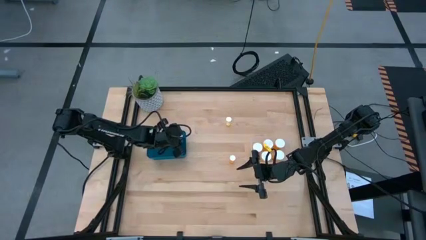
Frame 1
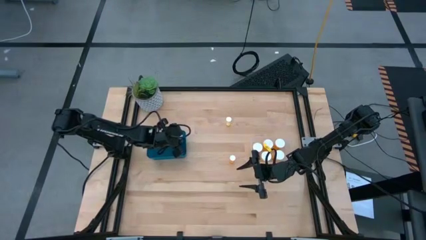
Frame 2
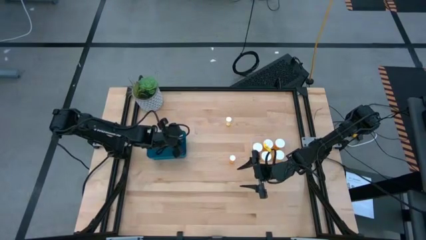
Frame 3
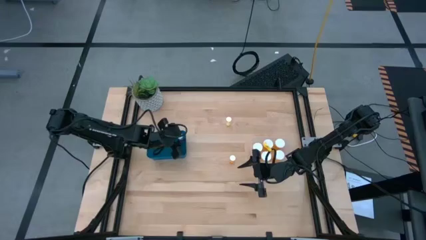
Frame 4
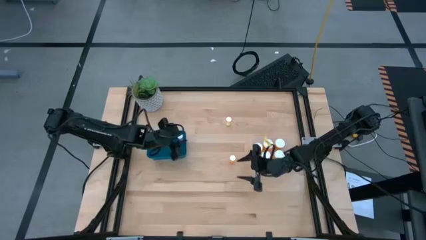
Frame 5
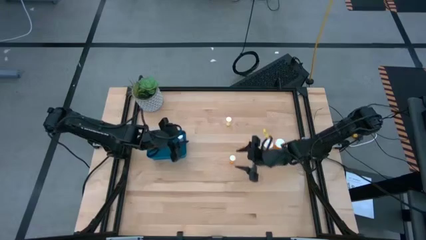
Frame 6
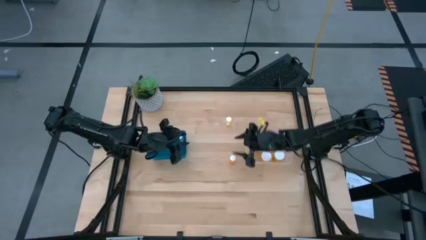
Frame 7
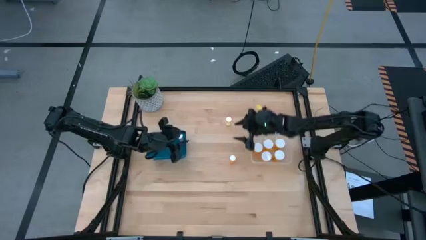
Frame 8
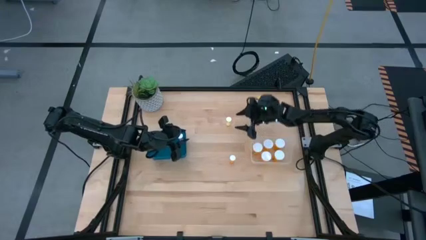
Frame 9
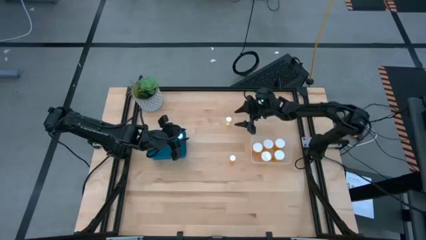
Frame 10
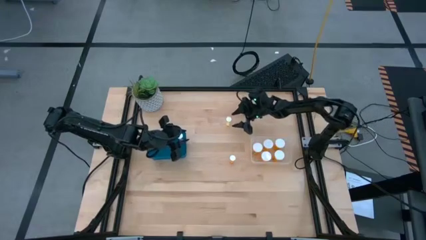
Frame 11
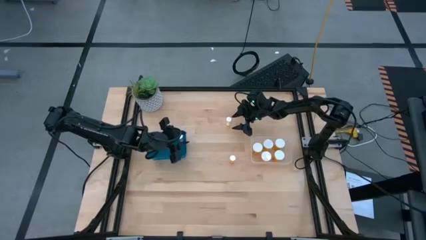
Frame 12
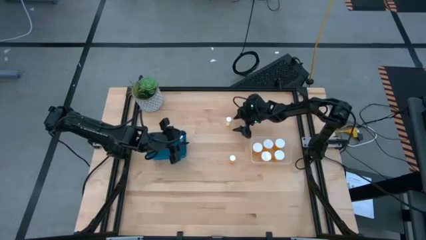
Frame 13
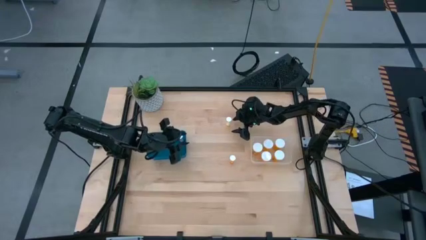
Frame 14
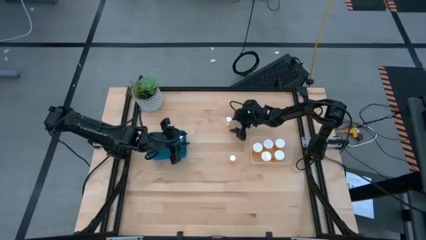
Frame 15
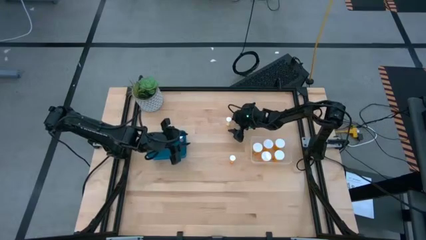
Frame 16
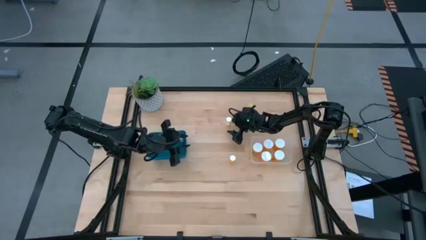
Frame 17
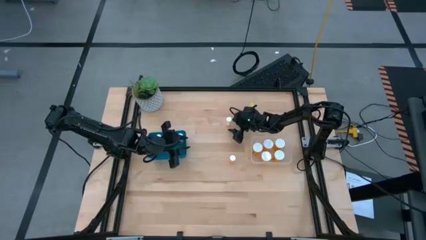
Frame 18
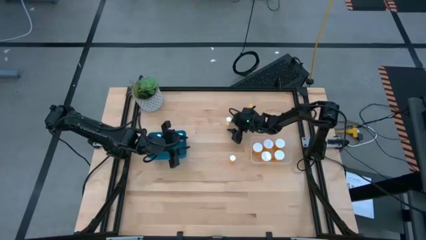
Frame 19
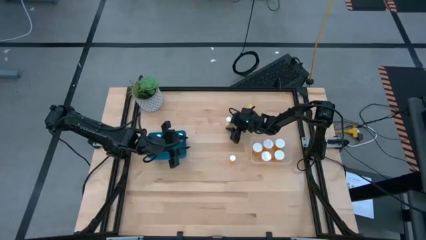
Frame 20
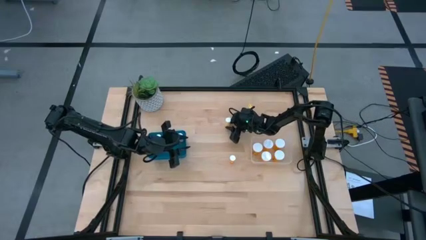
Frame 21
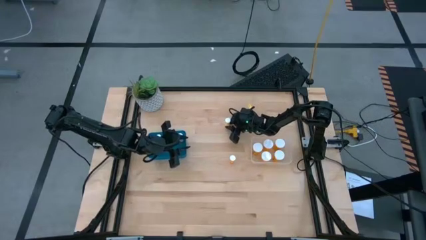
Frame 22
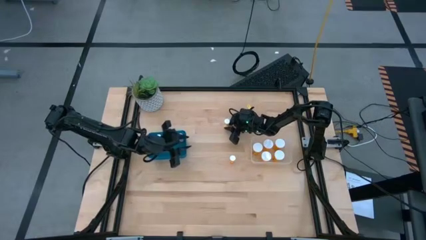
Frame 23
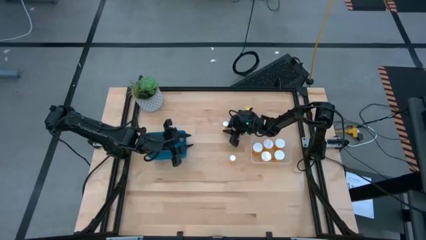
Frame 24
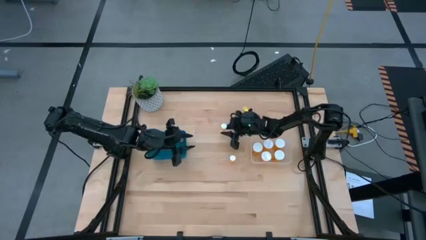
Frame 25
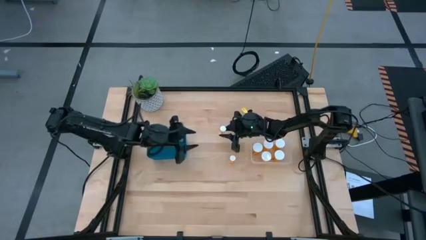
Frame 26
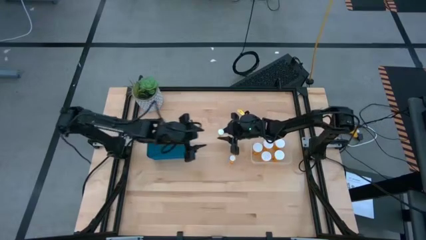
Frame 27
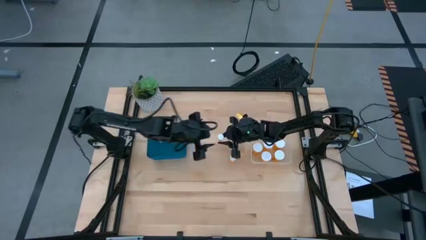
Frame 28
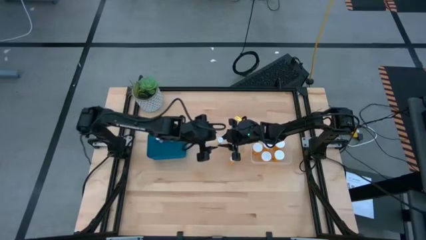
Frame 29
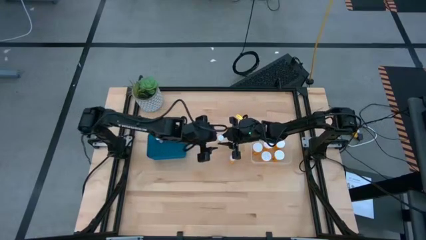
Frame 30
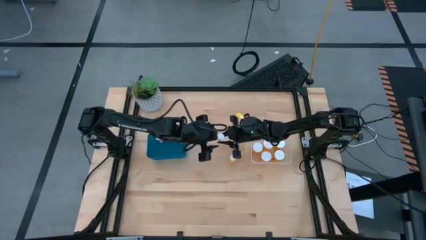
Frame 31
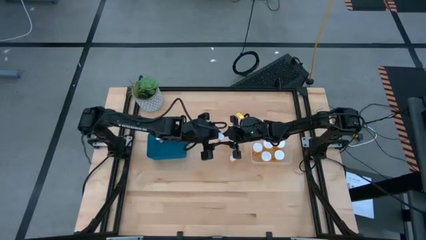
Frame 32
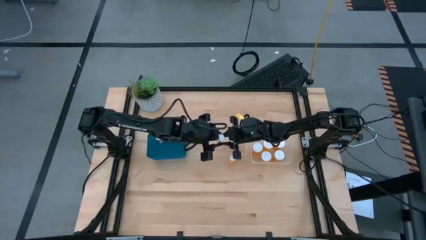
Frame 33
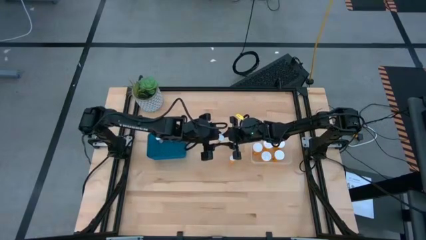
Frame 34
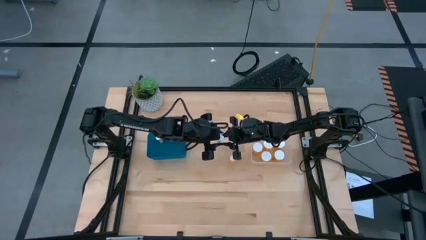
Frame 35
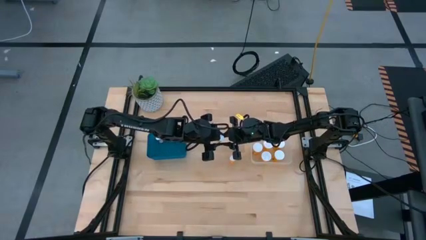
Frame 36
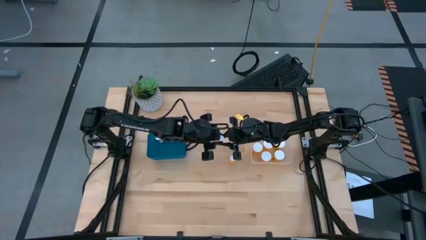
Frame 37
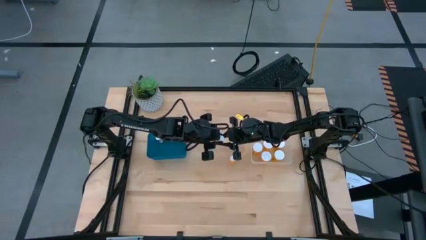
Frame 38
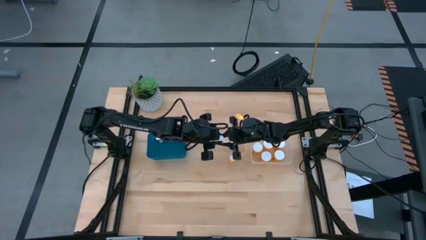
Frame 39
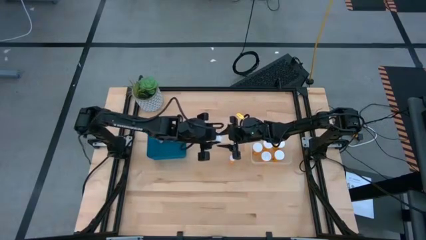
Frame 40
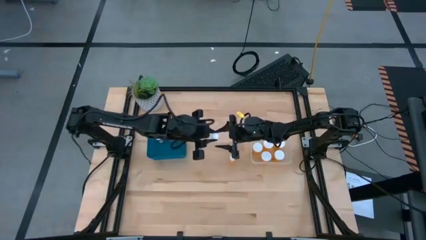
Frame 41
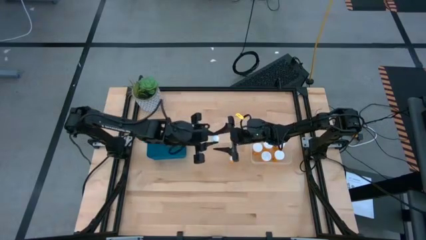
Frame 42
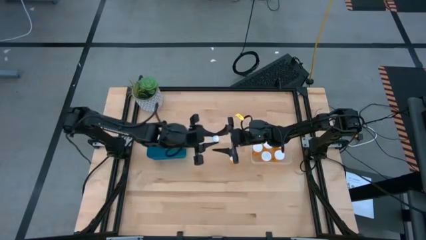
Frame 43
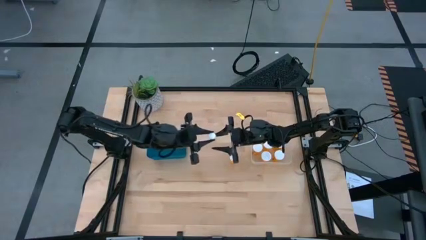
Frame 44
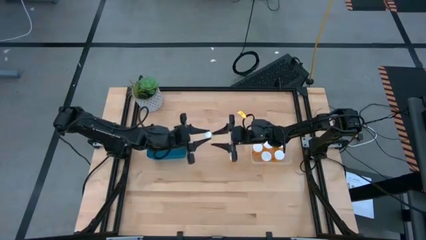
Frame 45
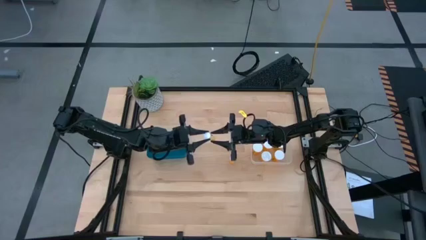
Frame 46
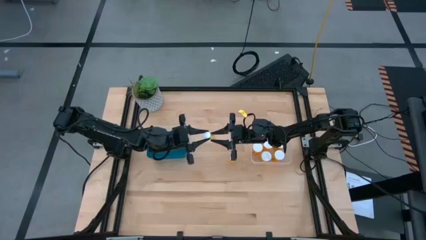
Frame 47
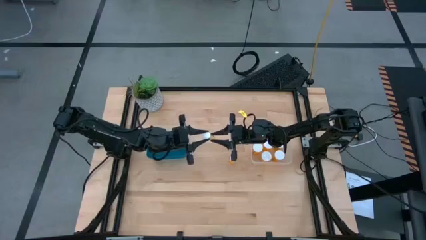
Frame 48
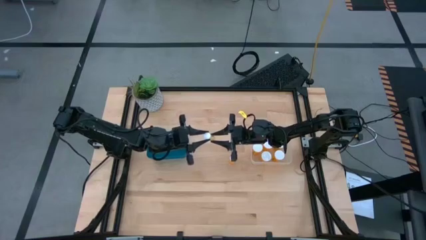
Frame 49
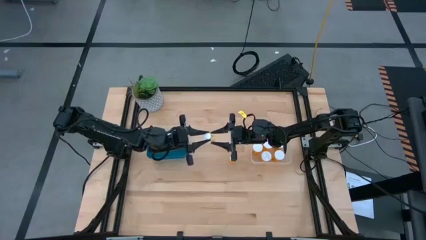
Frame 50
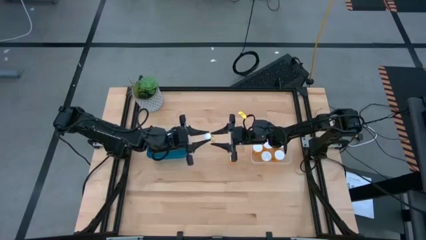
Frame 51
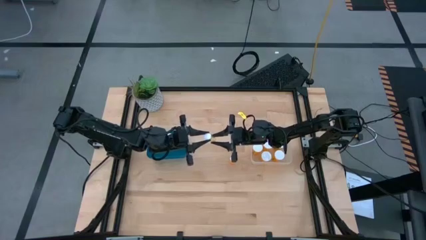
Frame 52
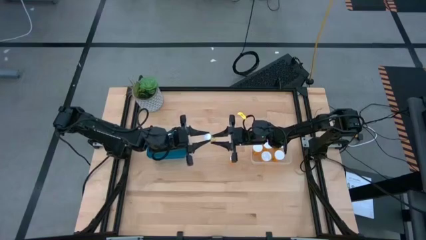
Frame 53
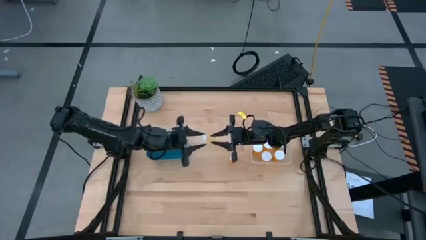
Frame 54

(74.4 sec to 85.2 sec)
Task: Pick and place medicine bottles into bin by pill shape (circle, oval)
Put the small yellow pill bottle into the blue bin

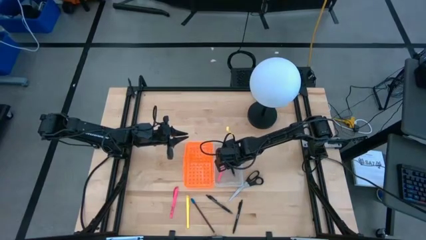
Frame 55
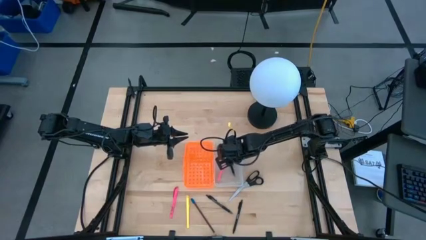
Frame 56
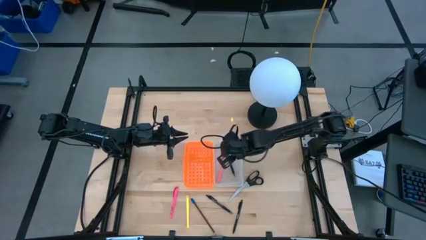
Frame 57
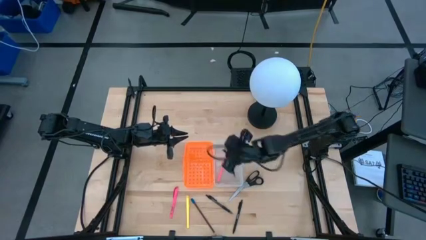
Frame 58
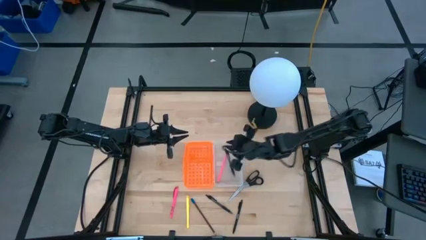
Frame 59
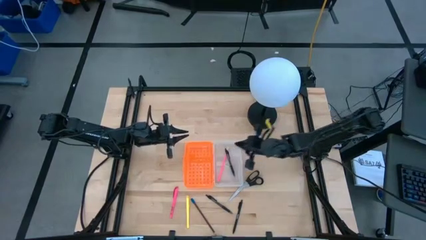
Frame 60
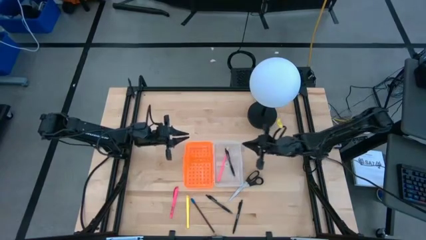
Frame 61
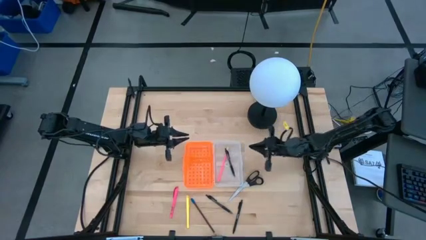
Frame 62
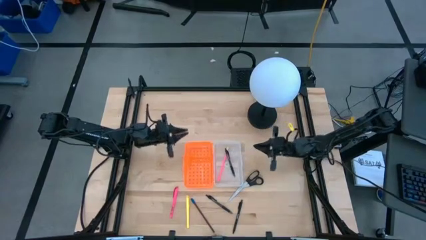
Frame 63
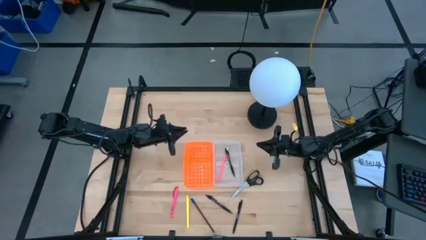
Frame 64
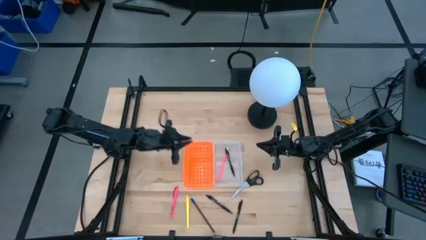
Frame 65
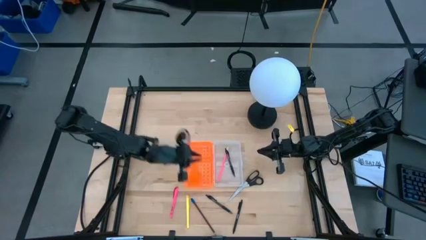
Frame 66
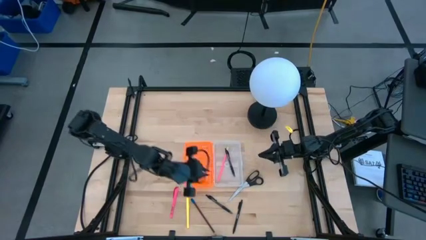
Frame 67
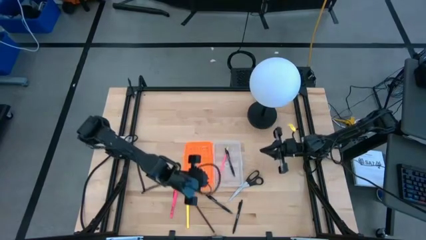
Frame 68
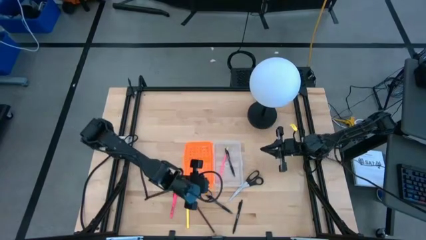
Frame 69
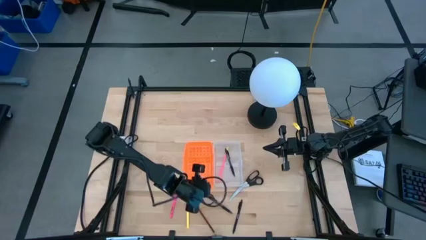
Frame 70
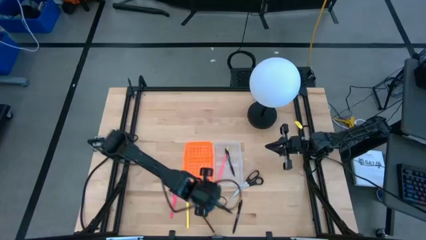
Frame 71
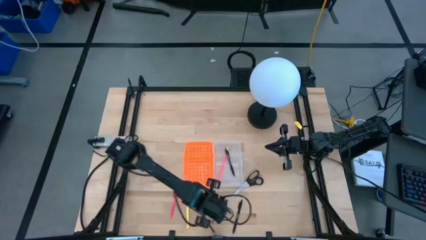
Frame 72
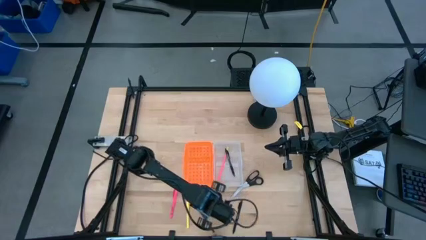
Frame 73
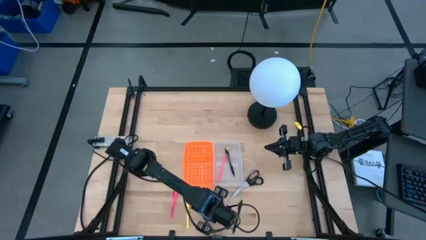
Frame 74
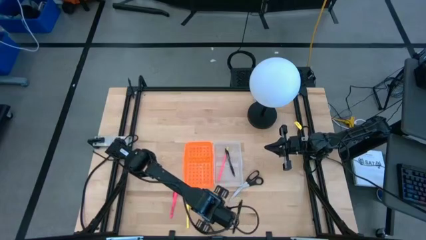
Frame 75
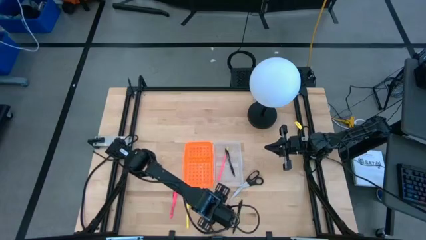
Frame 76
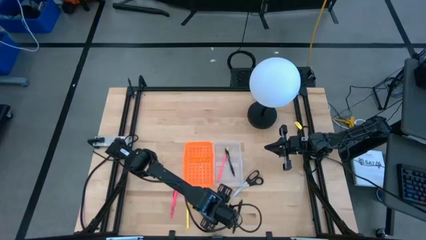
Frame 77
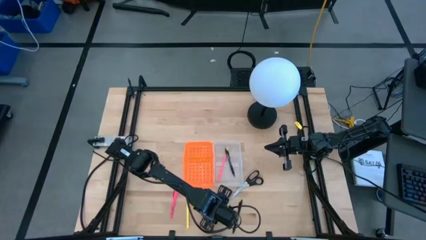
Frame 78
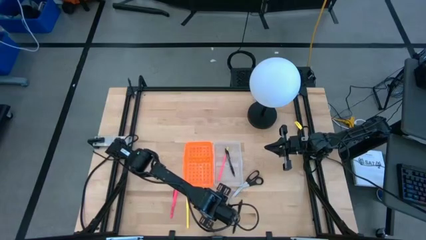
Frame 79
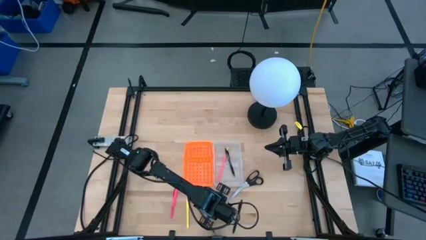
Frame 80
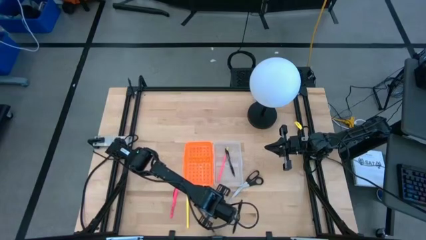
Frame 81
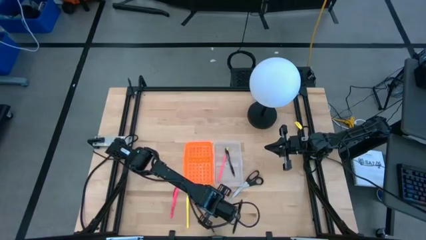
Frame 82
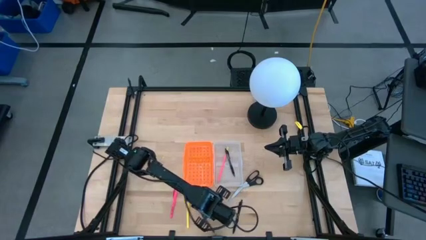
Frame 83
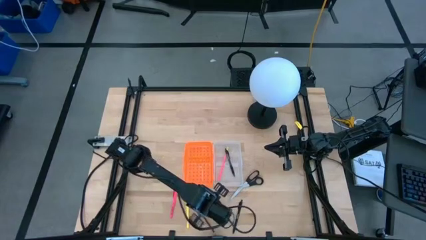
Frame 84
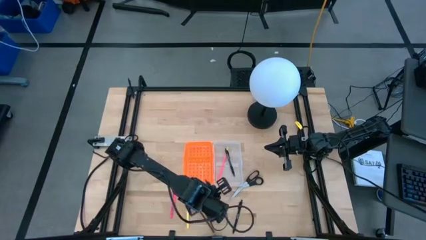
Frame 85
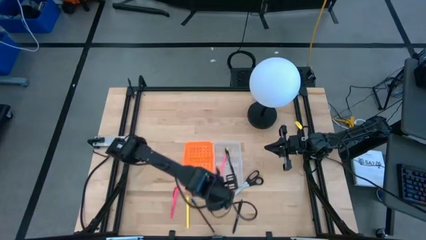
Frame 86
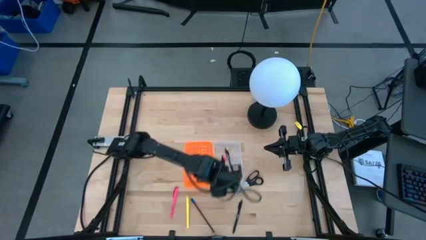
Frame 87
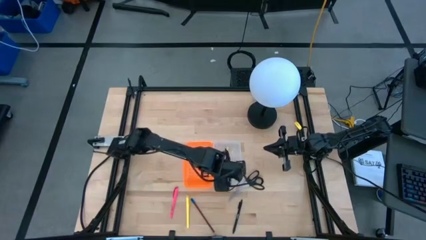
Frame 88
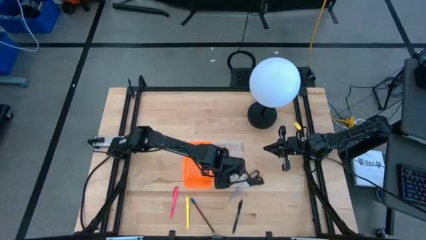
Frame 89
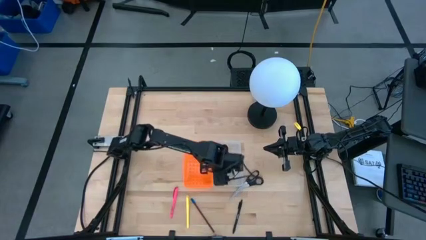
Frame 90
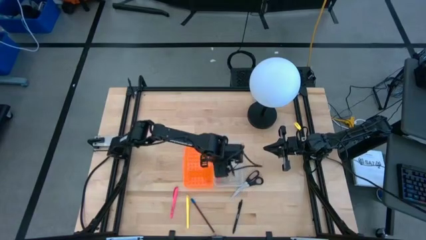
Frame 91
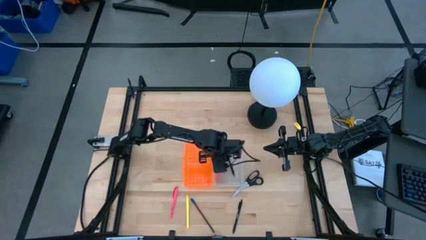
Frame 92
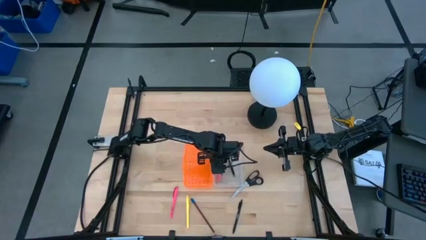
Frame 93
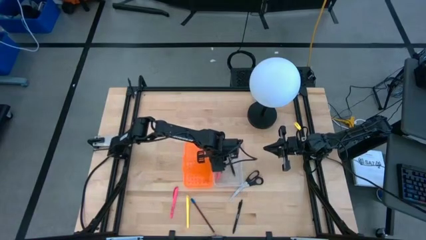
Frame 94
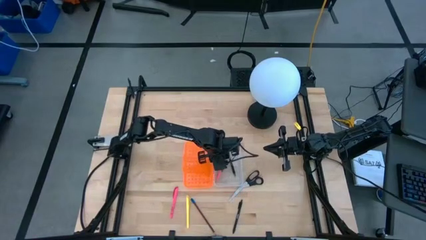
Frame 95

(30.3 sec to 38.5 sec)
Task: Pick & place school supplies into a supply box
Put the black pen into the orange supply box
